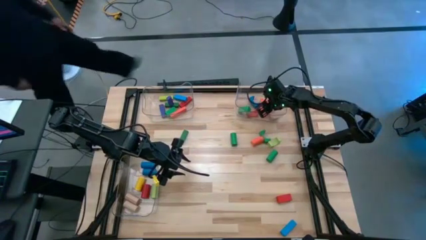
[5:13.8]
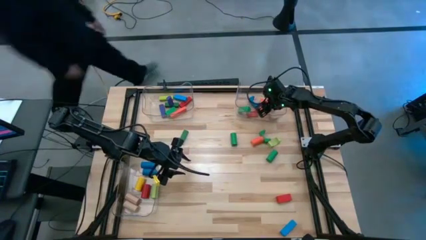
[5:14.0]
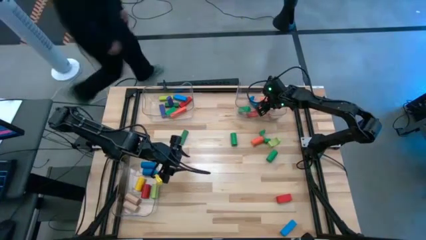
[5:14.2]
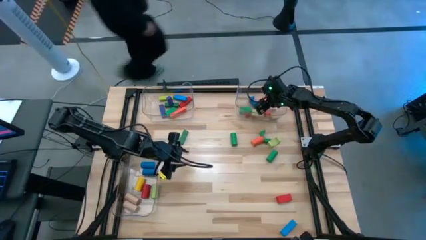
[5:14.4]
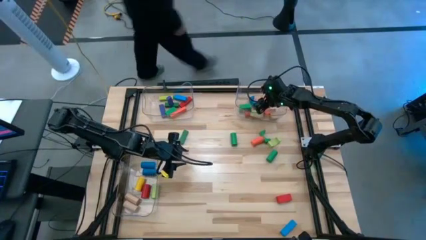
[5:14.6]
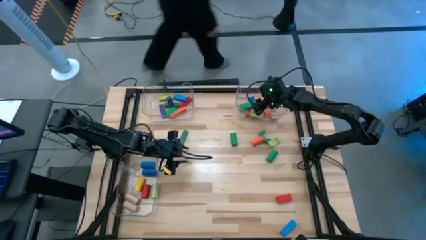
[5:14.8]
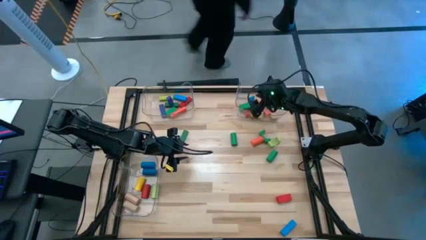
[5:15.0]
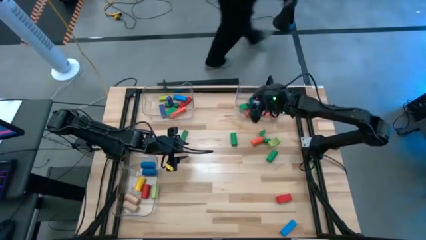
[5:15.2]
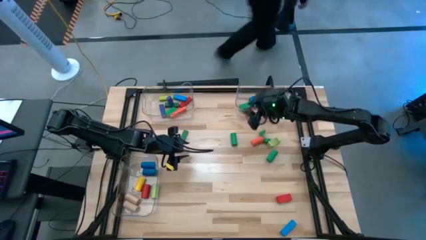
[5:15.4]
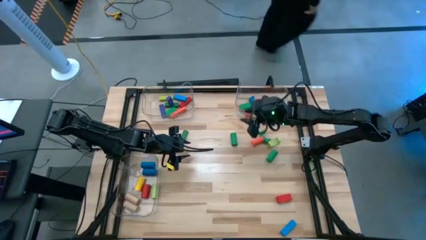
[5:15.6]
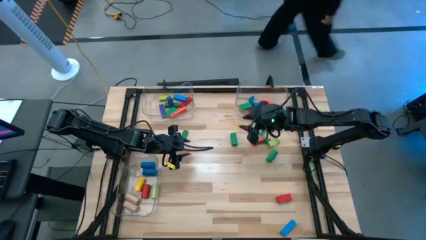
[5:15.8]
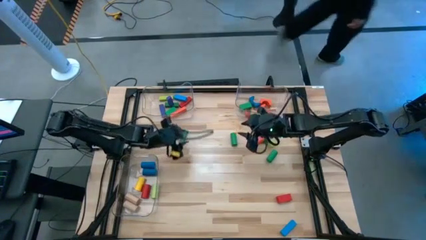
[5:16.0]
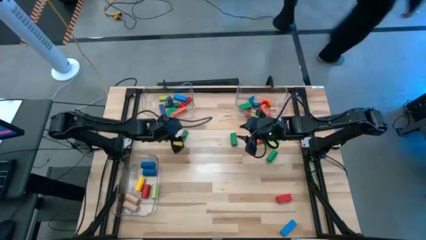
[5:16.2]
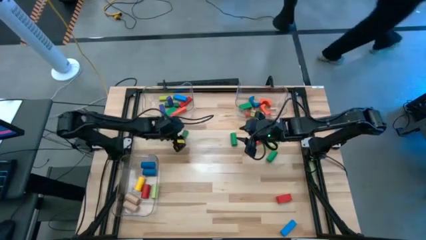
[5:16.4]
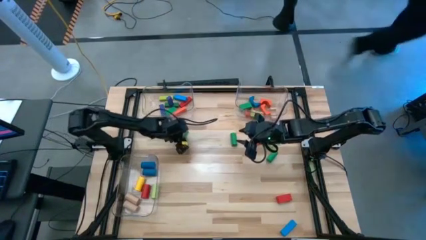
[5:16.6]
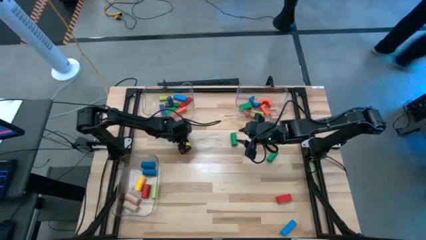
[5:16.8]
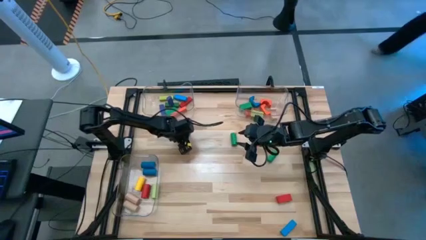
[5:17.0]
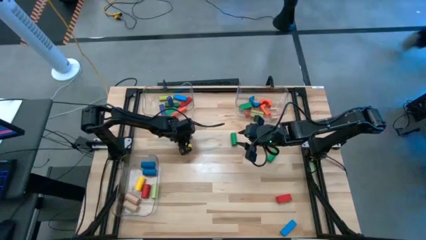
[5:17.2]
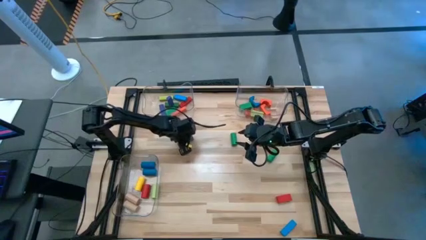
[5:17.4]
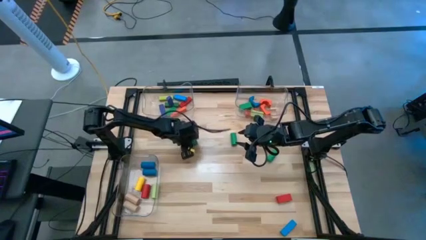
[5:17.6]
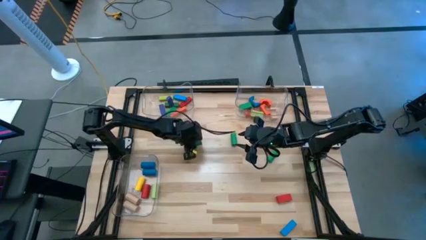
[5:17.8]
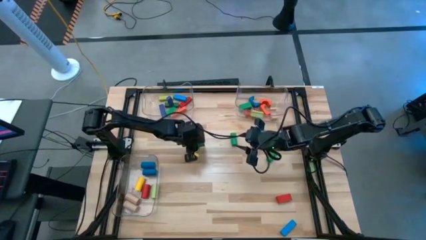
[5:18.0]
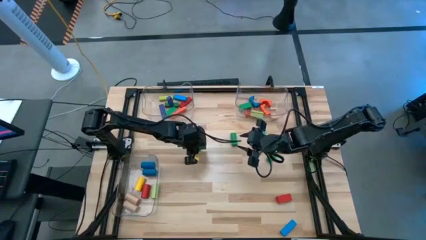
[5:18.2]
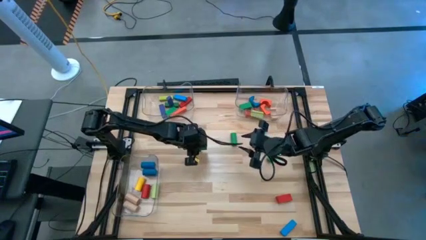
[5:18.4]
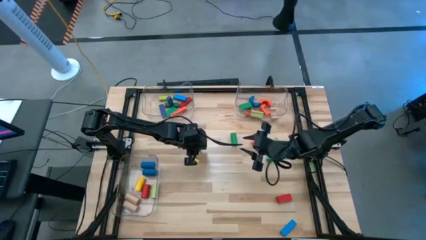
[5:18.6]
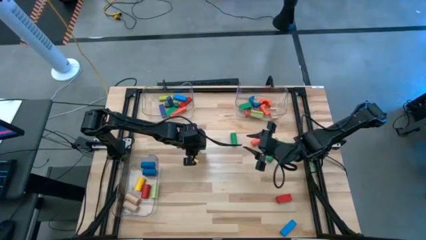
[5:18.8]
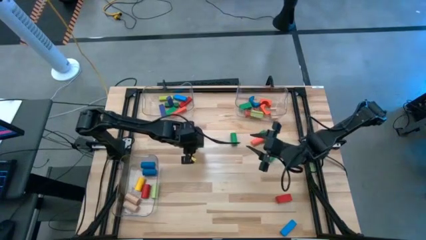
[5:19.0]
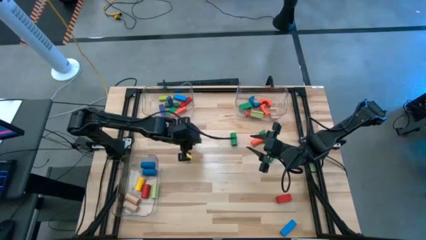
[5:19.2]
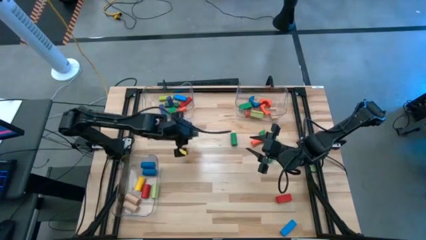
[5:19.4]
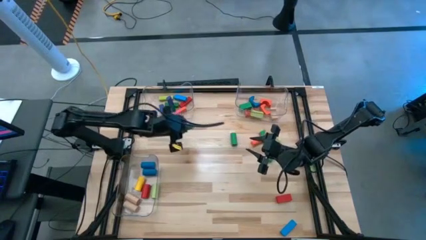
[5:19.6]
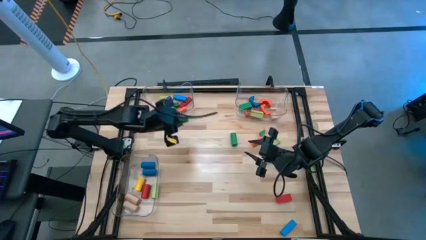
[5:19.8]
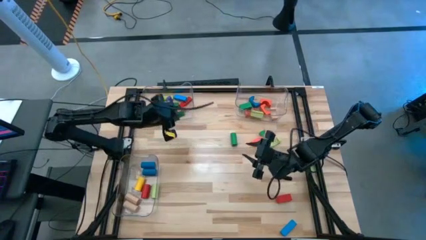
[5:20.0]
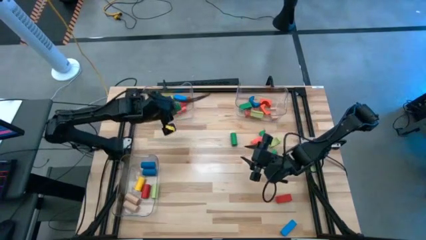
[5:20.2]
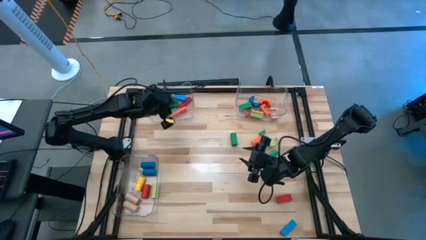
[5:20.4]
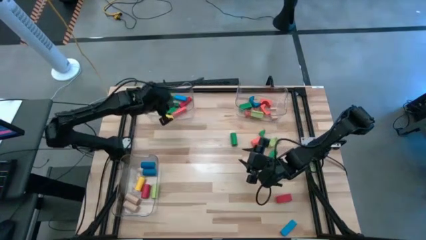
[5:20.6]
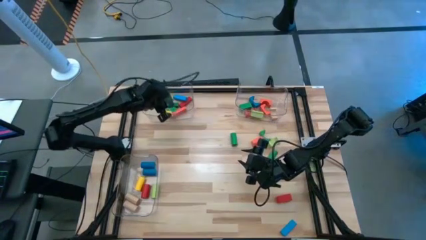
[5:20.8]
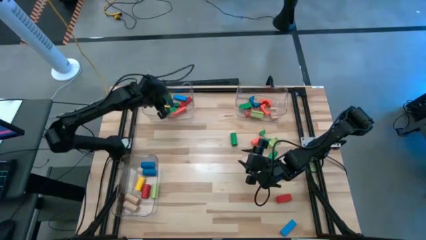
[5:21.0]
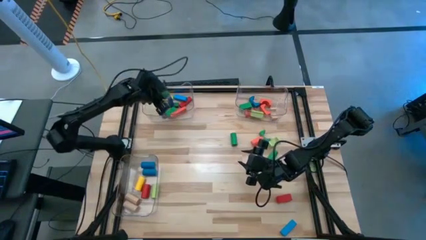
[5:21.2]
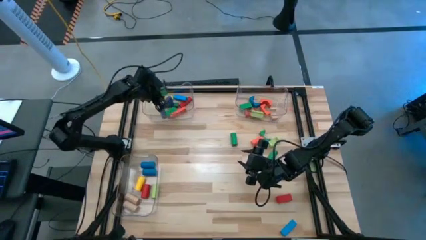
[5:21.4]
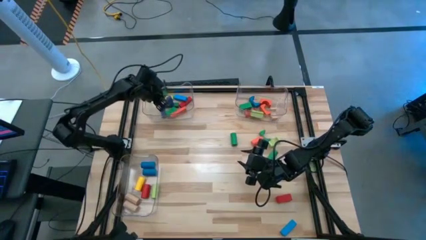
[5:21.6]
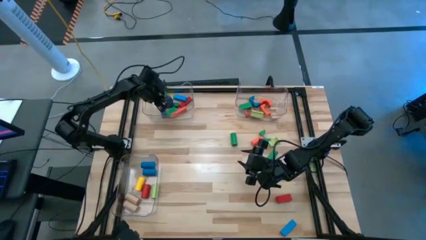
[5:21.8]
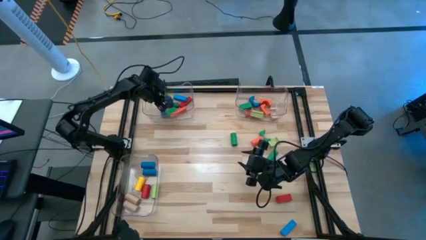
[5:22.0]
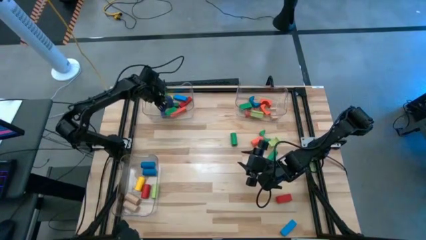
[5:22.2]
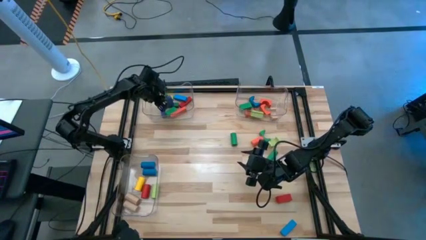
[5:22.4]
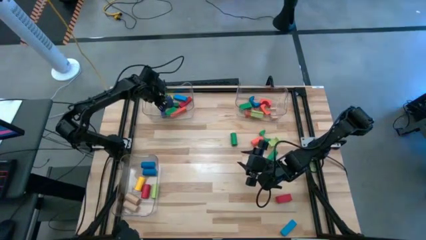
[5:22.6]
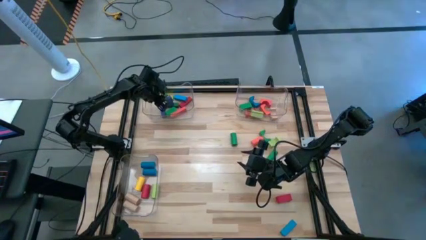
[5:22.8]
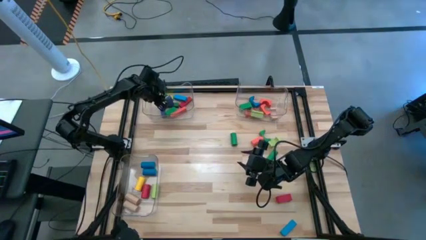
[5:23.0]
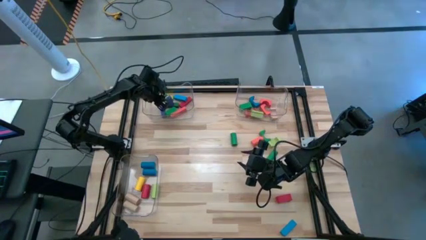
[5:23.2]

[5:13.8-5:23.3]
Task: Sort blocks by size
Put the green rectangular block into the top left transparent bin

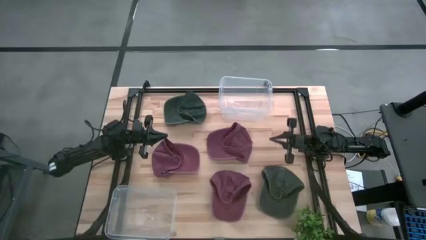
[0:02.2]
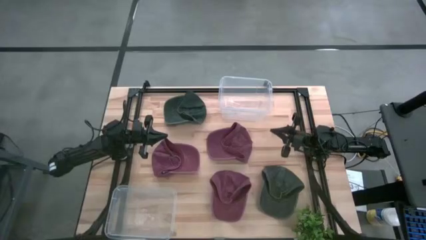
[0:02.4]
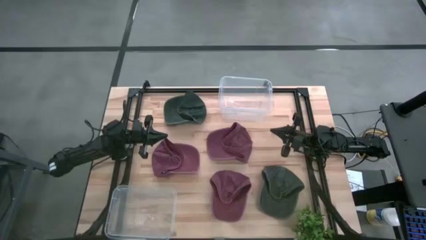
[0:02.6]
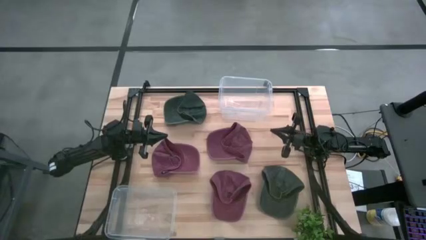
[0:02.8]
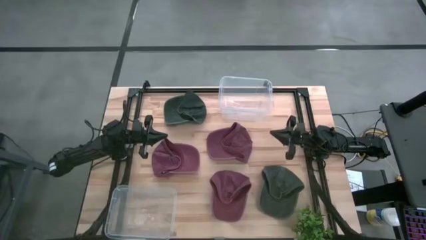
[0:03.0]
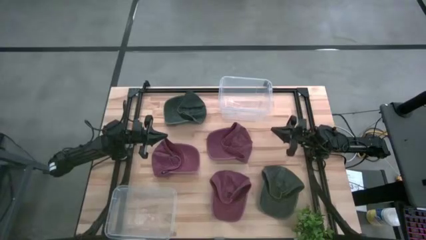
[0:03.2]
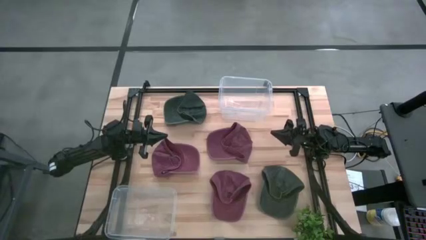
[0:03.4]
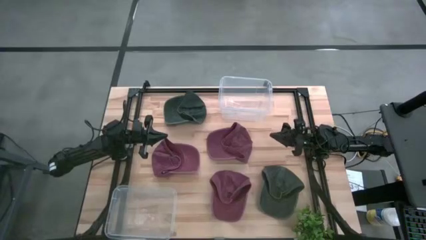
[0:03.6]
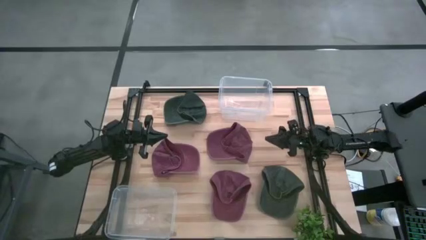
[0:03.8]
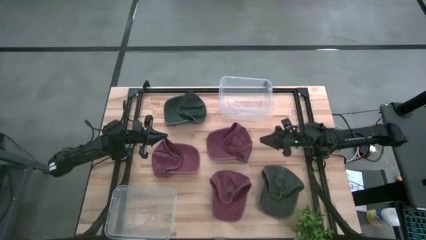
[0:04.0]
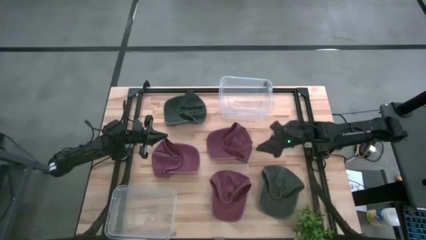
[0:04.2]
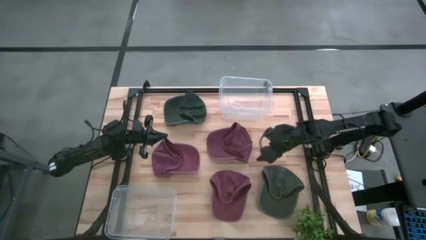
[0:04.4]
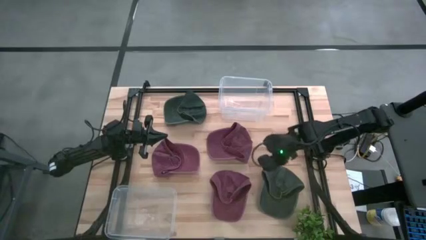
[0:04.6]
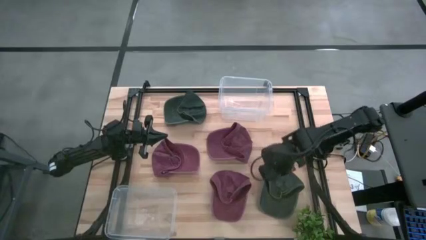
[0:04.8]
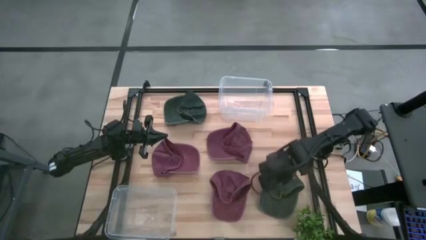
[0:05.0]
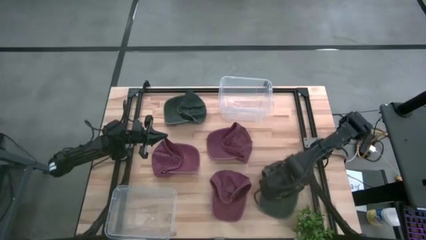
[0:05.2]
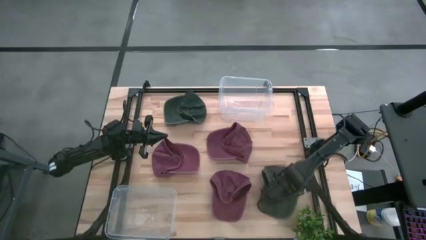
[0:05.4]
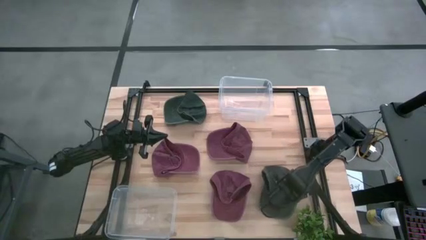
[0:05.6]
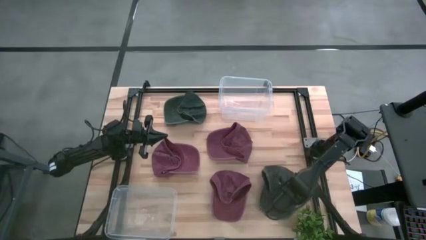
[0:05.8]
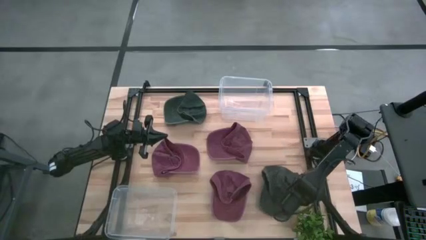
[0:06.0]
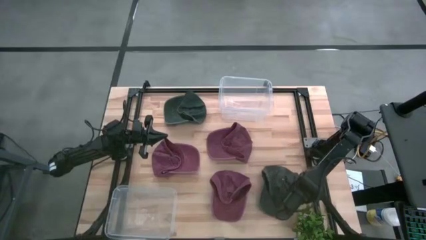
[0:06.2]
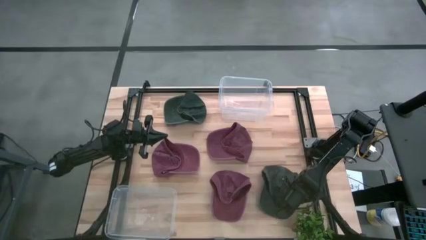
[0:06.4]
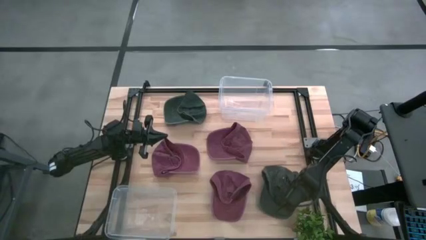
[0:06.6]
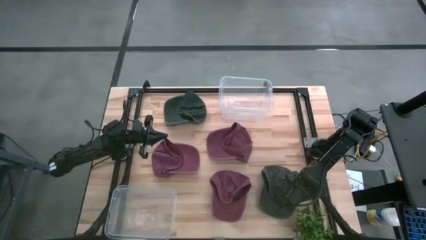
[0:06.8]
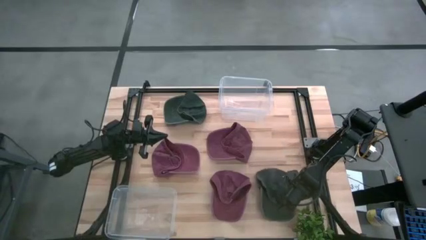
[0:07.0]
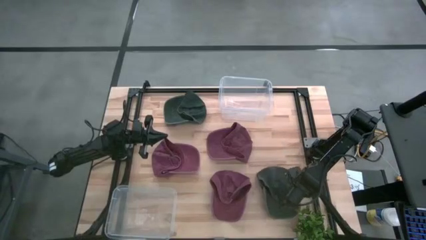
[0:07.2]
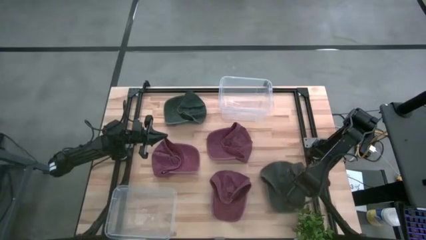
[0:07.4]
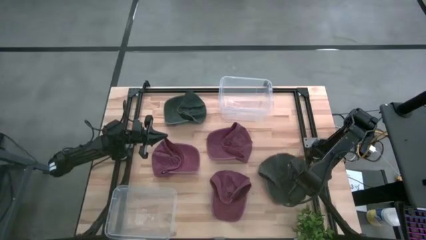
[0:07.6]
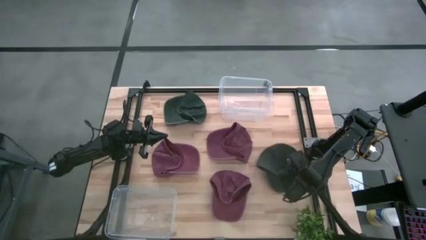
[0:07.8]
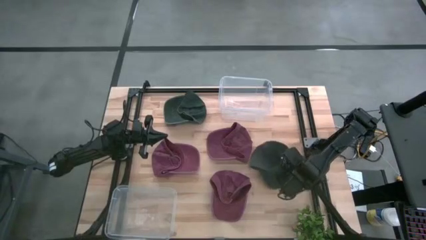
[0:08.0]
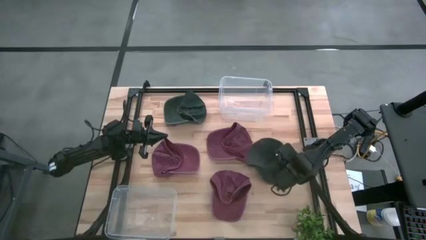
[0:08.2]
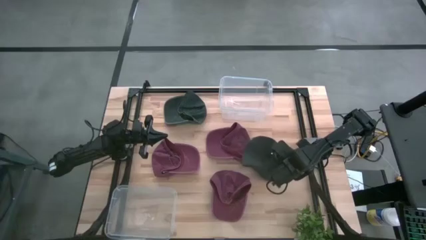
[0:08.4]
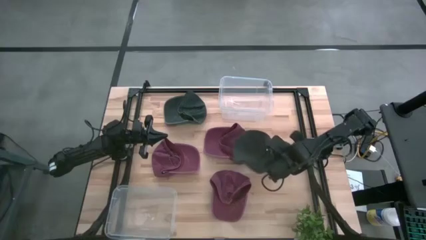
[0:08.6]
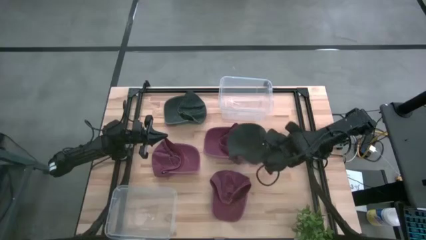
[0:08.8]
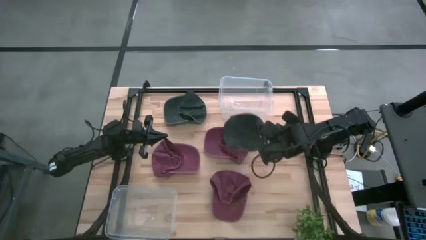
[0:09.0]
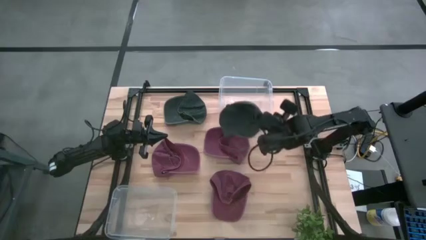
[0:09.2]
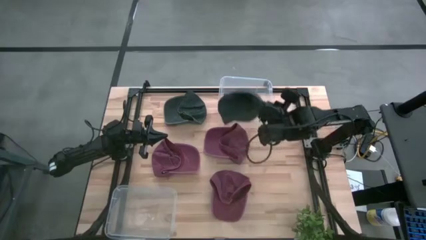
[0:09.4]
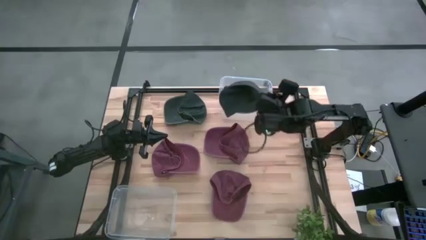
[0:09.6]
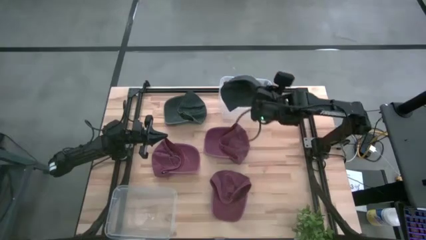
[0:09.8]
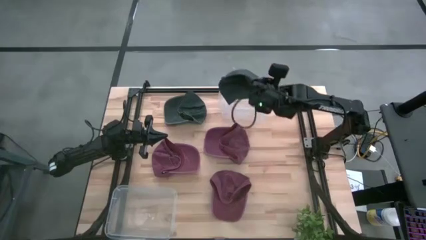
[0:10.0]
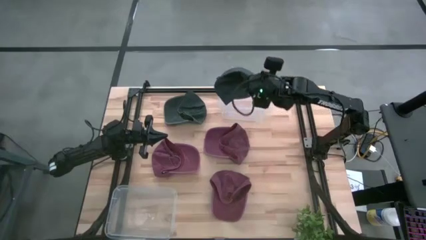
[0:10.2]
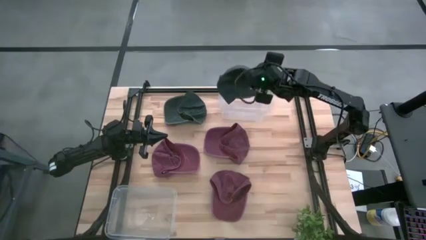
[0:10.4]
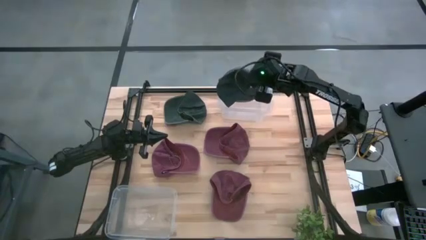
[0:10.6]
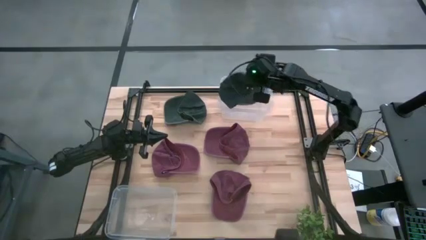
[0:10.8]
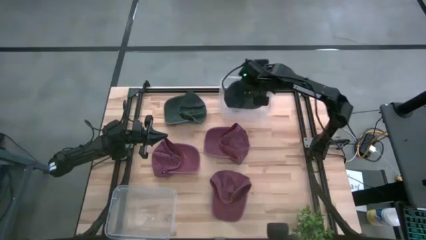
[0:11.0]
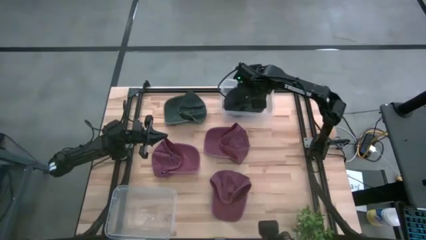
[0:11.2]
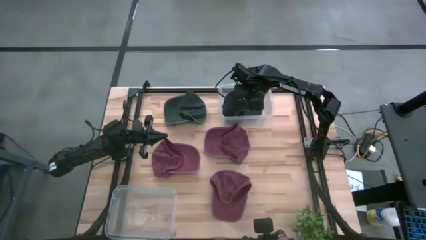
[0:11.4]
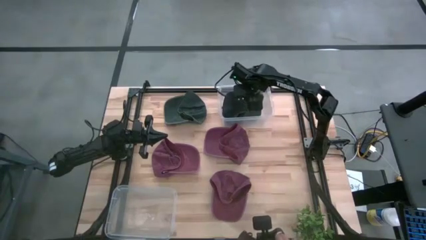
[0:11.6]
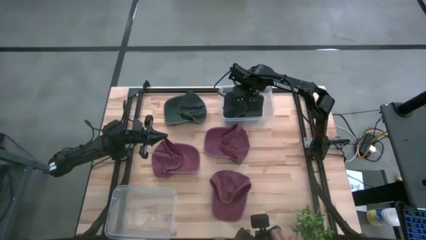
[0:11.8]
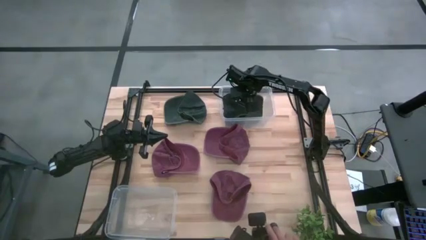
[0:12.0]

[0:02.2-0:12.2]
Task: Pick & Place hat
Put the bottom gray cap into the top transparent bin
